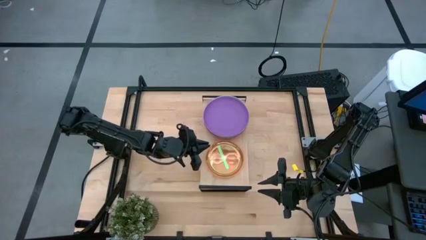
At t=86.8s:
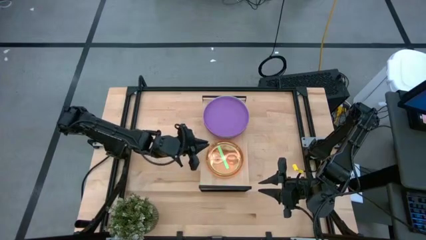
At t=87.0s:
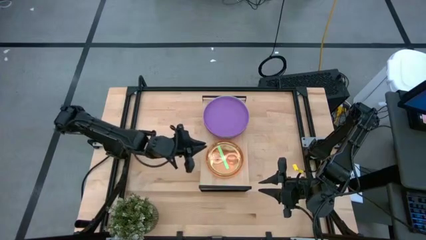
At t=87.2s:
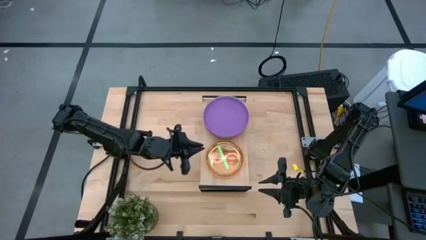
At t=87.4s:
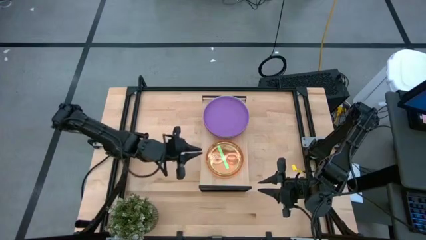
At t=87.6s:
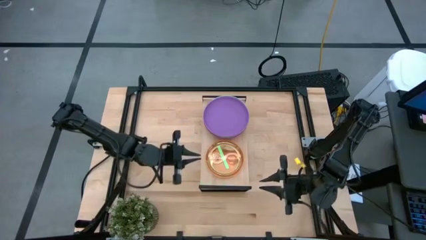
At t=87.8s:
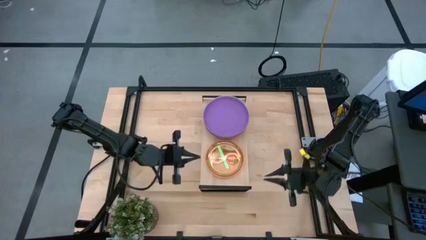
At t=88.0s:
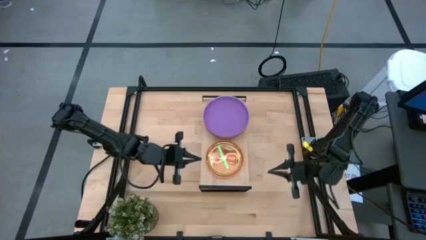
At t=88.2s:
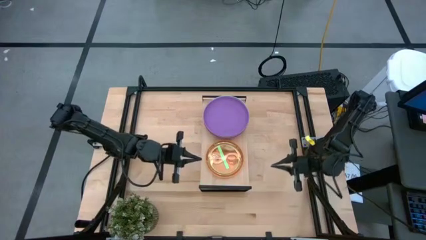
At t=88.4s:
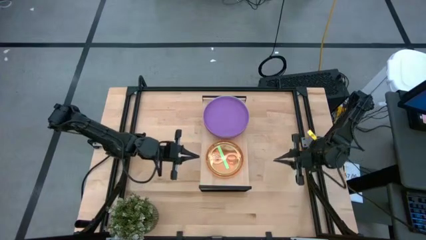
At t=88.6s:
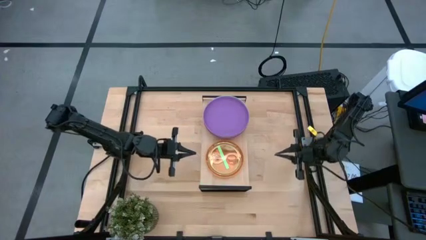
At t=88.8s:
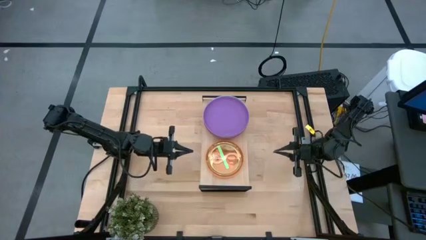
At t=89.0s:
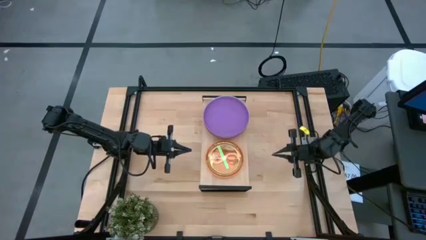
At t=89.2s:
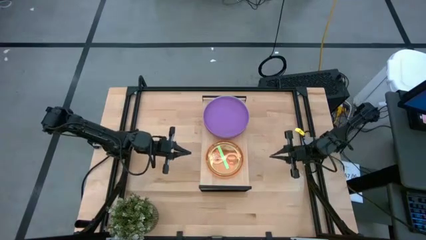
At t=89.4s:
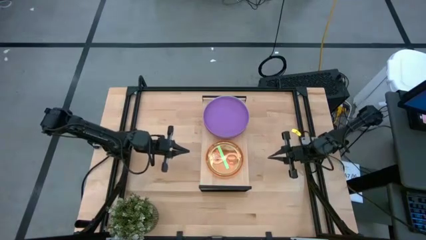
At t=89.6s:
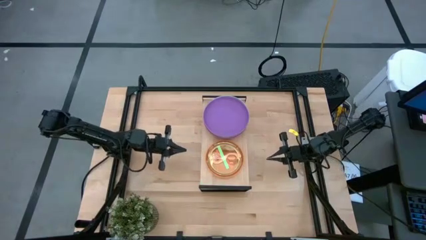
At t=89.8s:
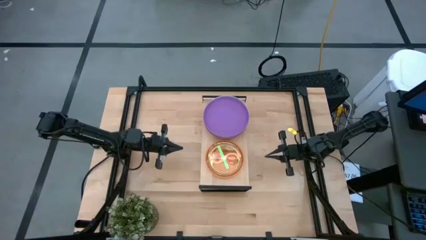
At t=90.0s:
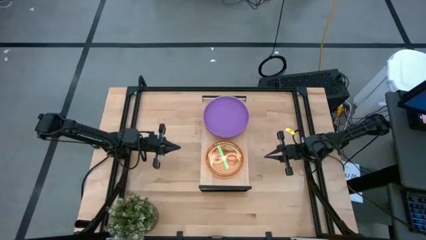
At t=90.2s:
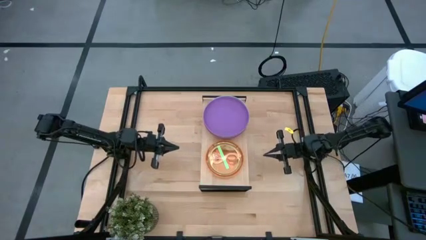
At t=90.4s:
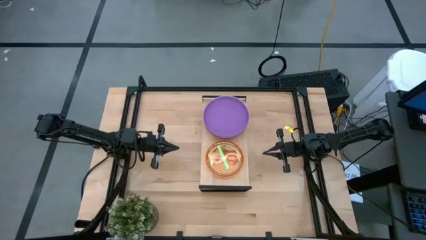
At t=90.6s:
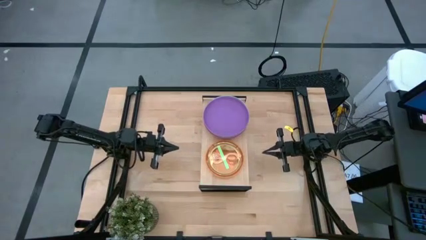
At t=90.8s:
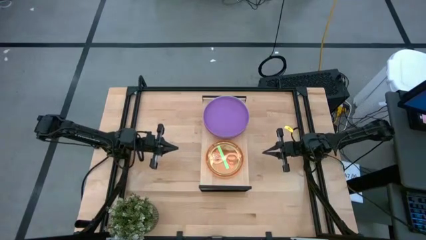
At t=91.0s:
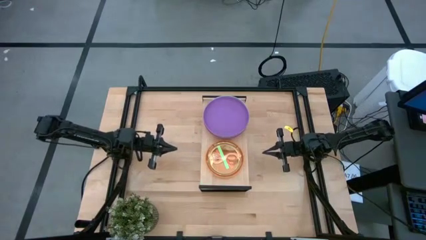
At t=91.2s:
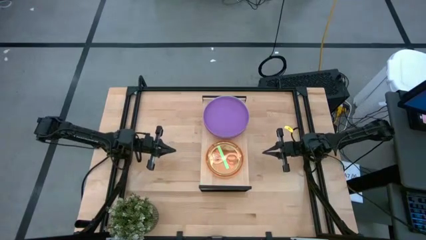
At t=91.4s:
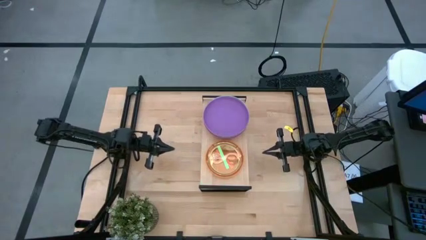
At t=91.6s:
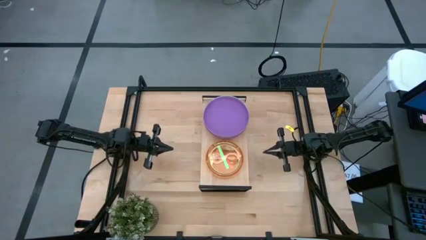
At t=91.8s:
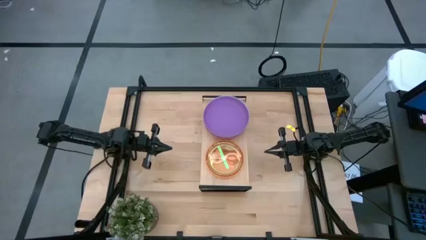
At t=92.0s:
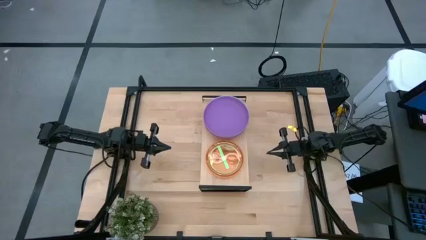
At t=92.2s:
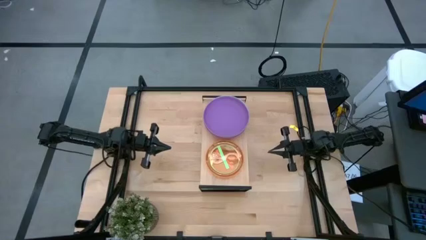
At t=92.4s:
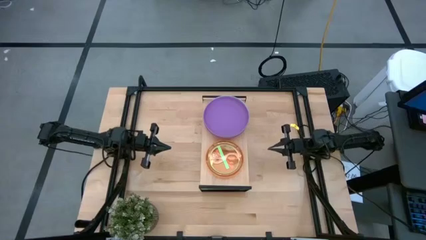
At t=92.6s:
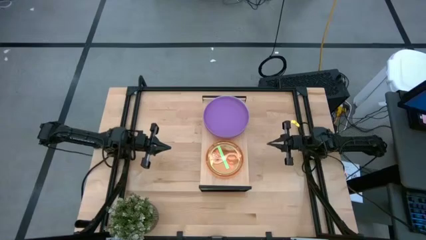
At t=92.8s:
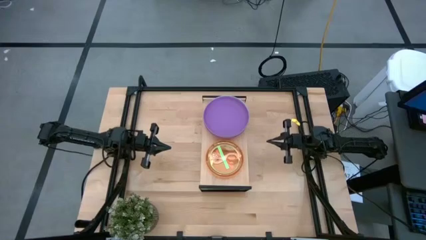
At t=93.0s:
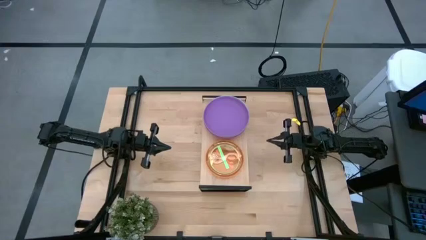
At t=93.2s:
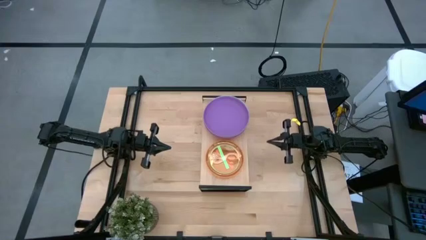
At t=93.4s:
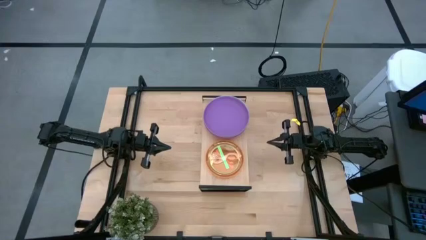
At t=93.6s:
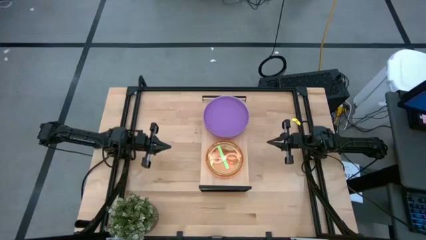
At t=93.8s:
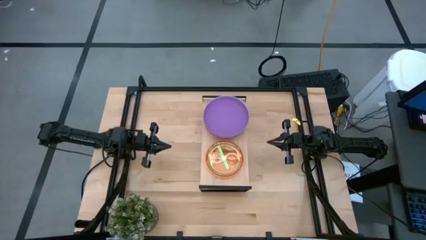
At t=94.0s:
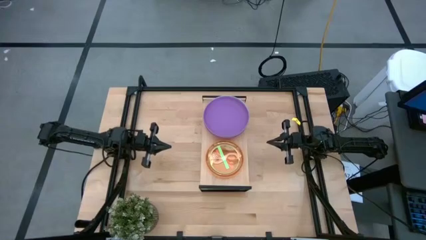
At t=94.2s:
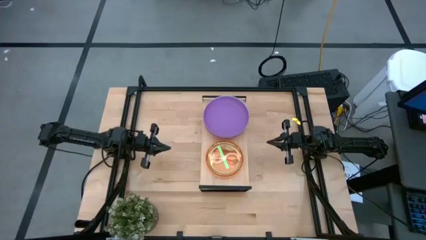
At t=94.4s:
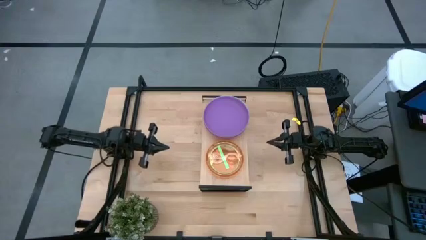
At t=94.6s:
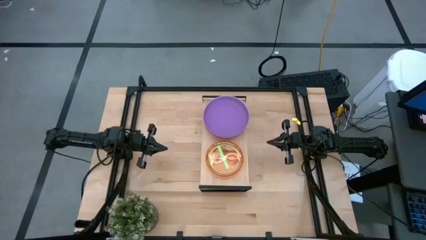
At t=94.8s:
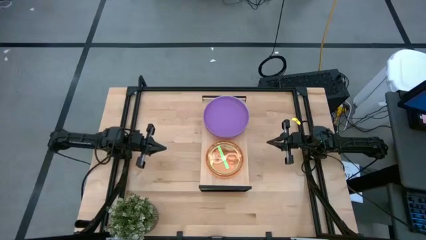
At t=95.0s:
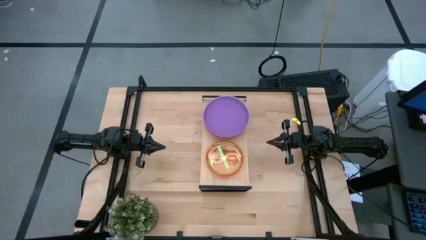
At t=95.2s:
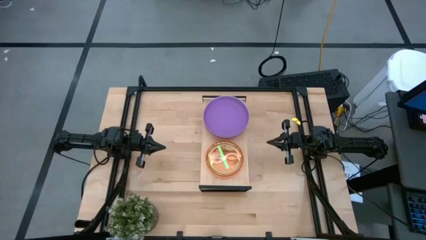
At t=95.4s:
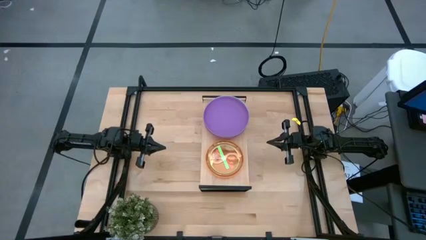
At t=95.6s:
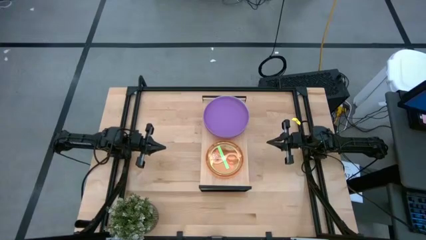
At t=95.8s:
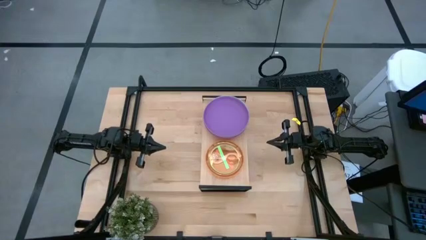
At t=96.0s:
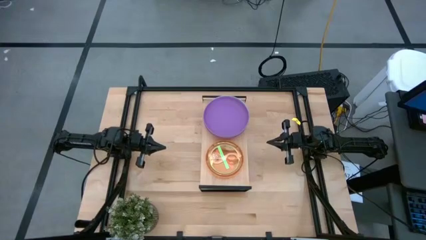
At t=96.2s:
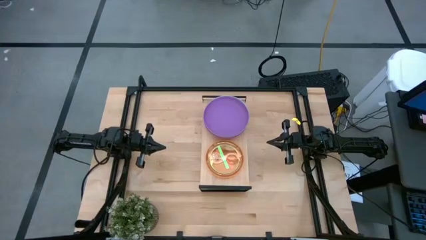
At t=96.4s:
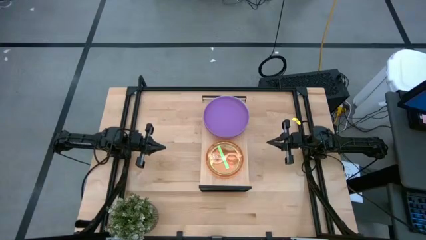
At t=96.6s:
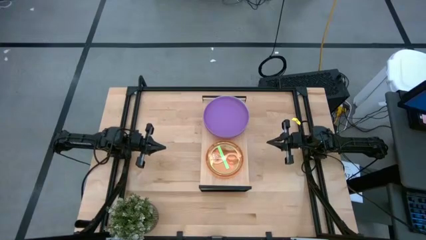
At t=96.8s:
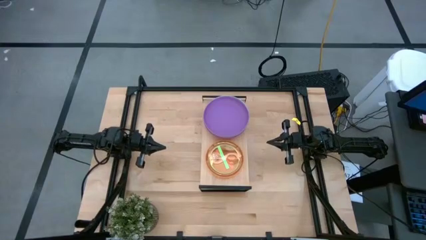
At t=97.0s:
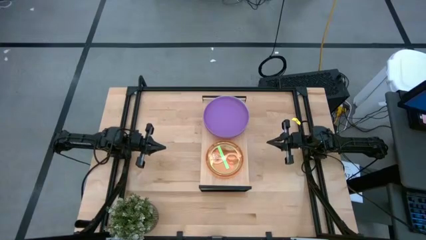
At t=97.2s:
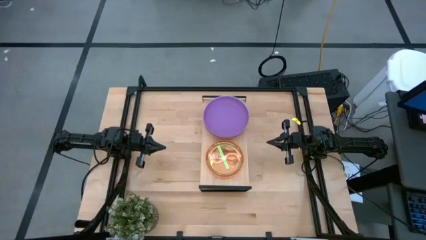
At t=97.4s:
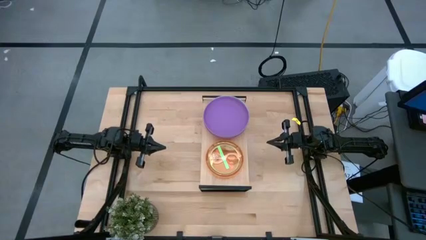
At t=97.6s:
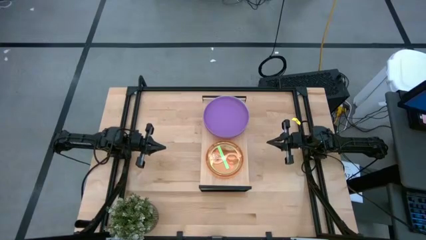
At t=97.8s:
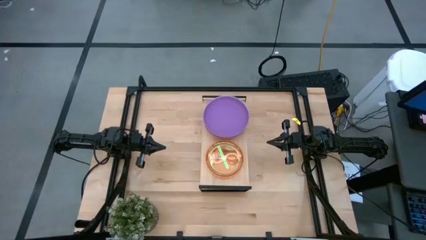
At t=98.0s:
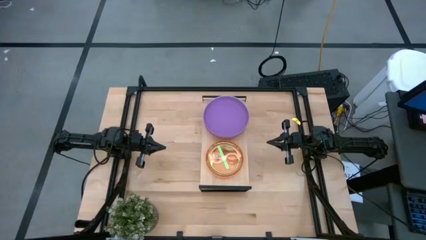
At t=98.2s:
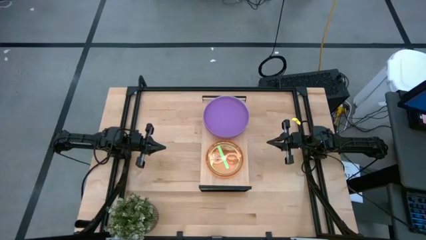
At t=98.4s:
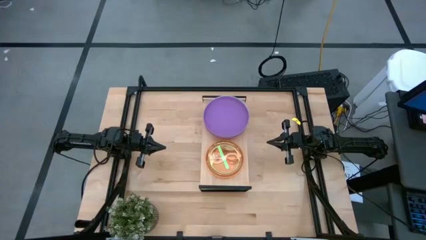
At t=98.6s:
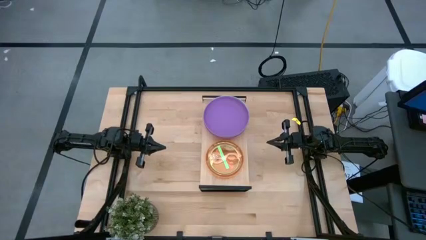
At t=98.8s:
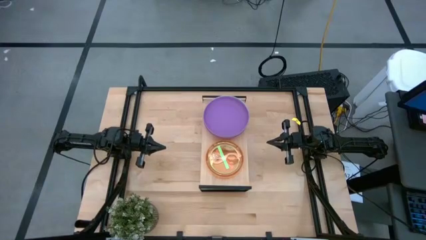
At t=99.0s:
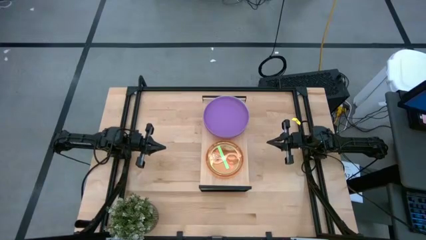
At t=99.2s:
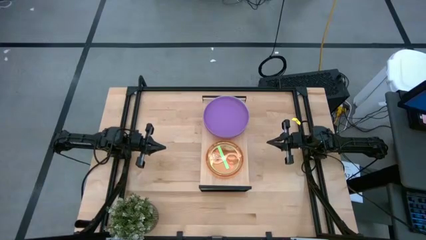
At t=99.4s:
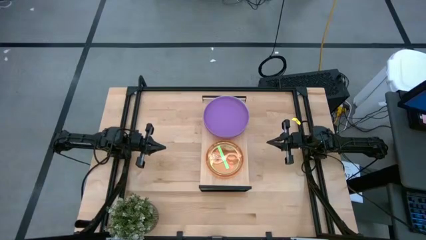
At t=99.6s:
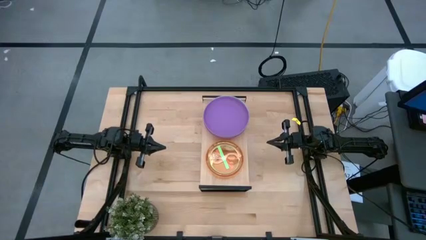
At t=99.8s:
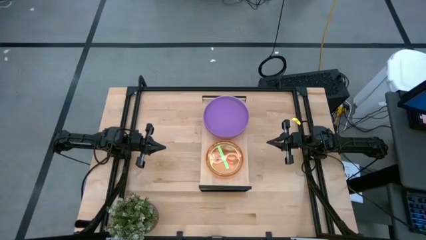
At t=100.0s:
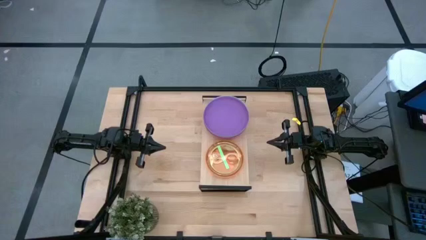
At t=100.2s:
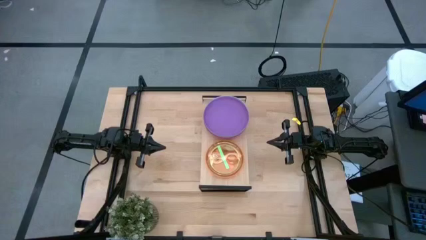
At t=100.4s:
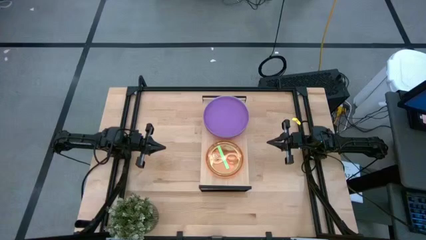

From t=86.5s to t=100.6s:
Task: Place and stack plates onto a shelf
Return to Home Position
